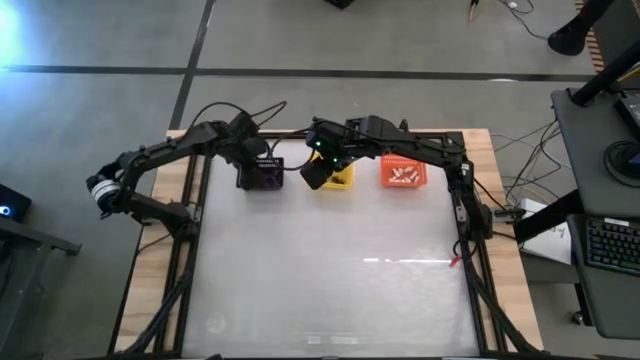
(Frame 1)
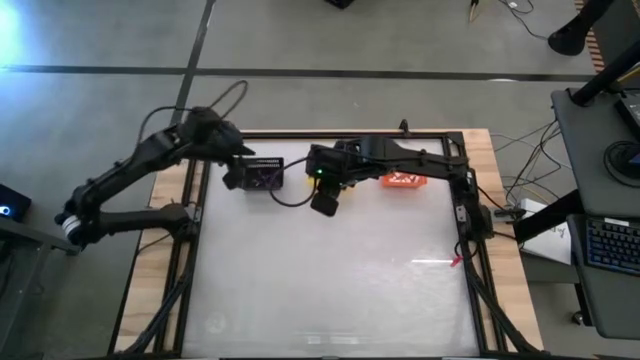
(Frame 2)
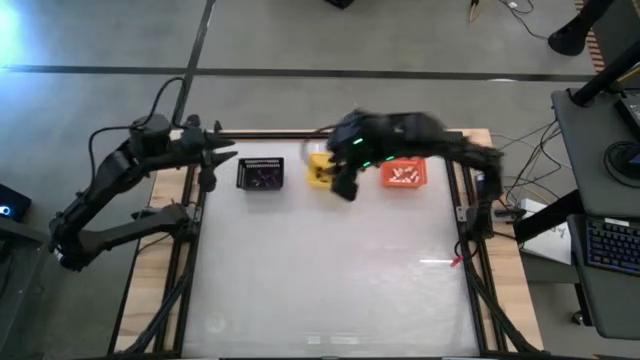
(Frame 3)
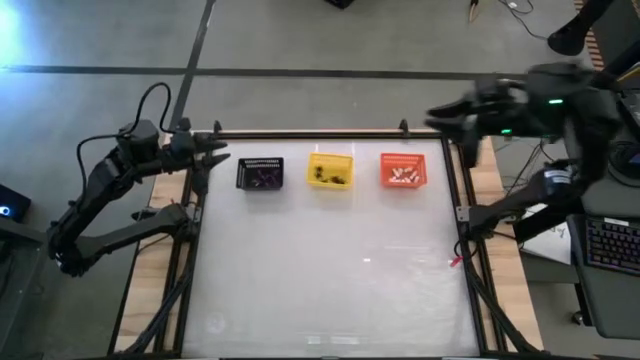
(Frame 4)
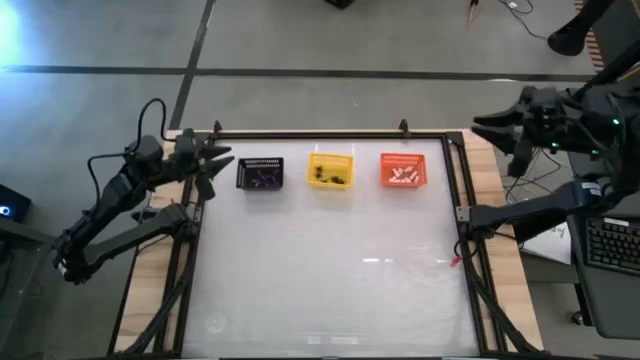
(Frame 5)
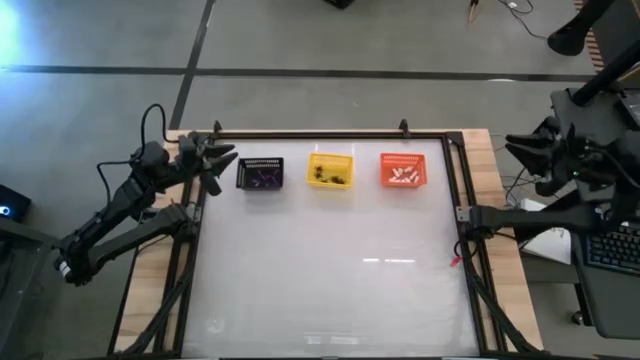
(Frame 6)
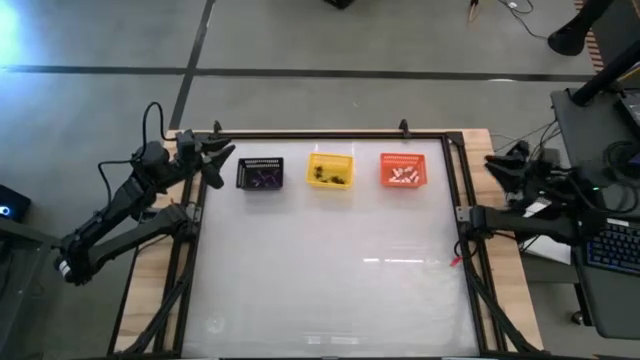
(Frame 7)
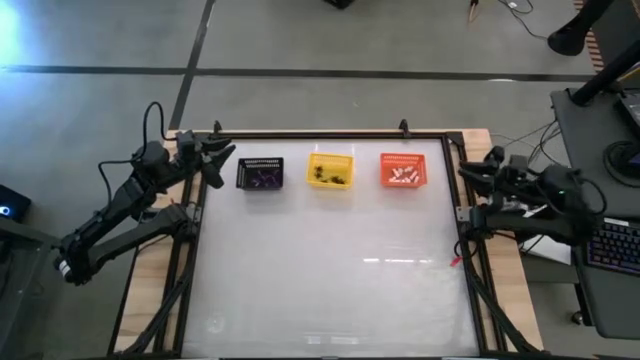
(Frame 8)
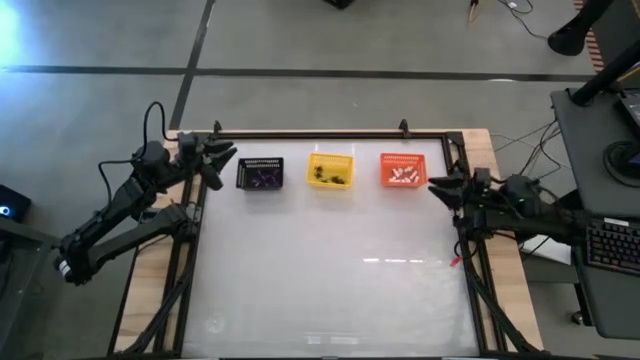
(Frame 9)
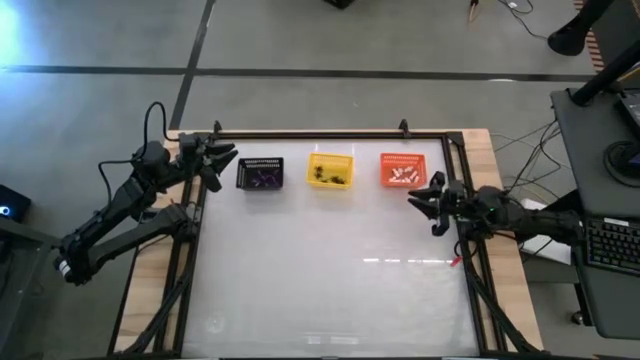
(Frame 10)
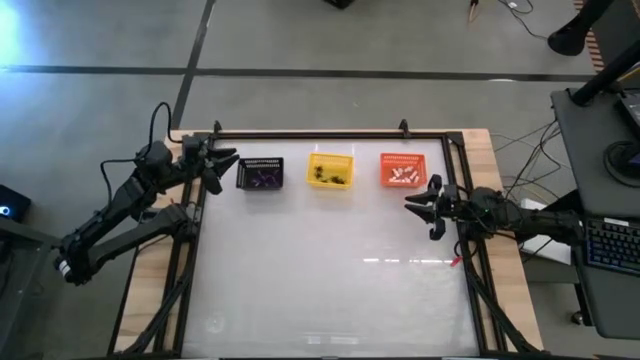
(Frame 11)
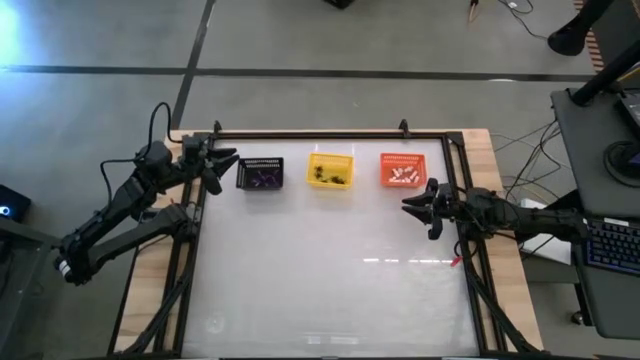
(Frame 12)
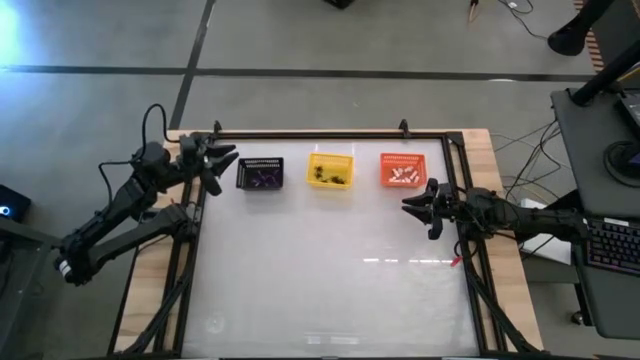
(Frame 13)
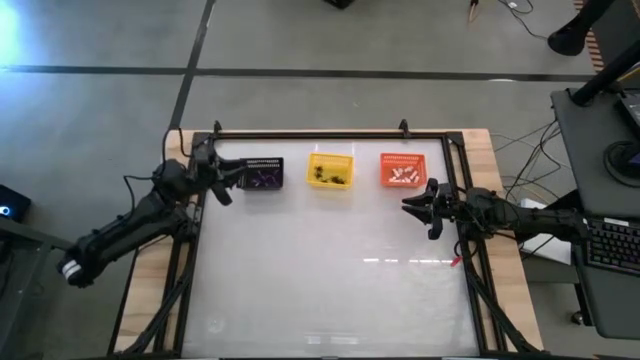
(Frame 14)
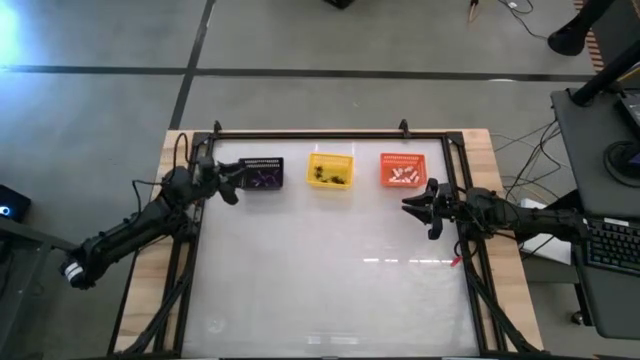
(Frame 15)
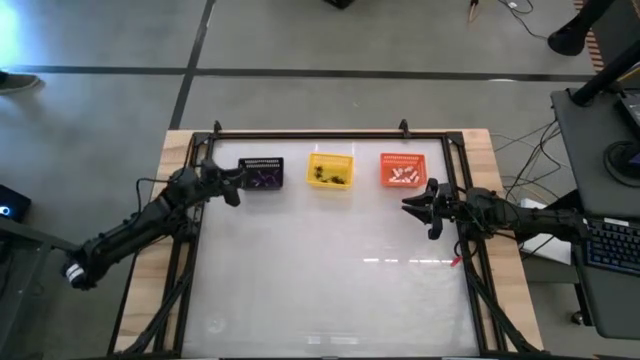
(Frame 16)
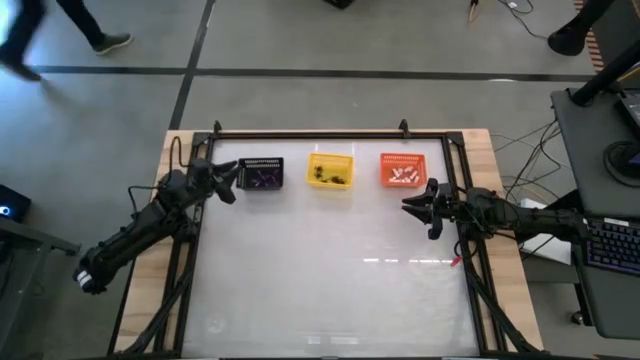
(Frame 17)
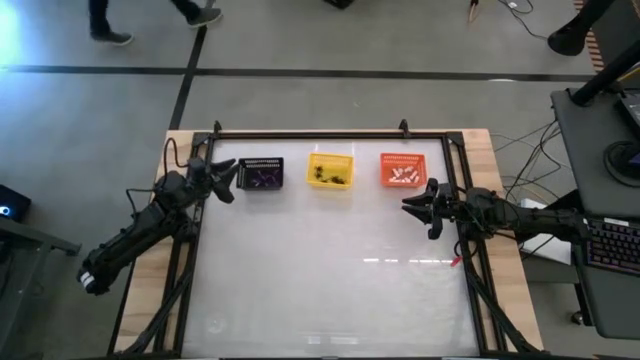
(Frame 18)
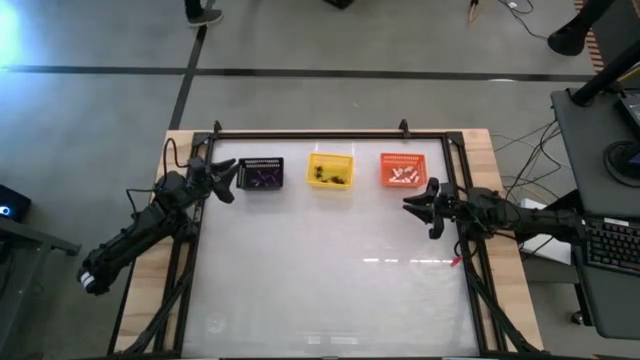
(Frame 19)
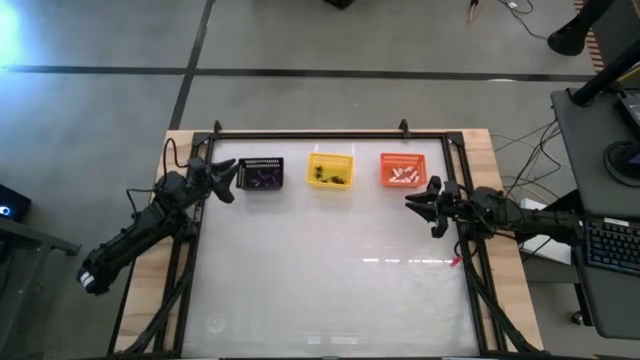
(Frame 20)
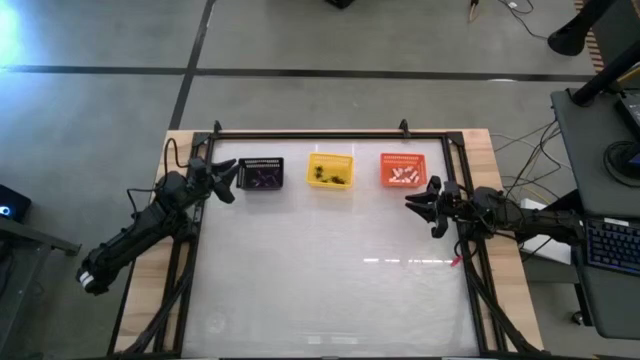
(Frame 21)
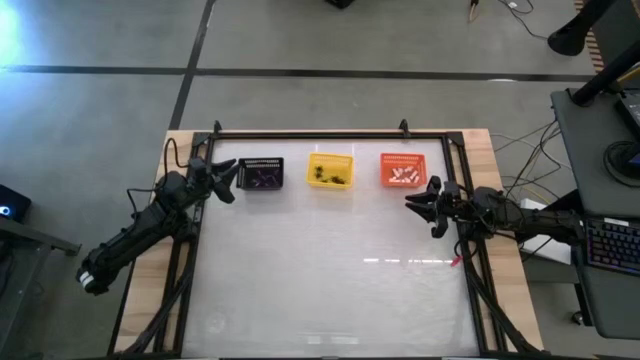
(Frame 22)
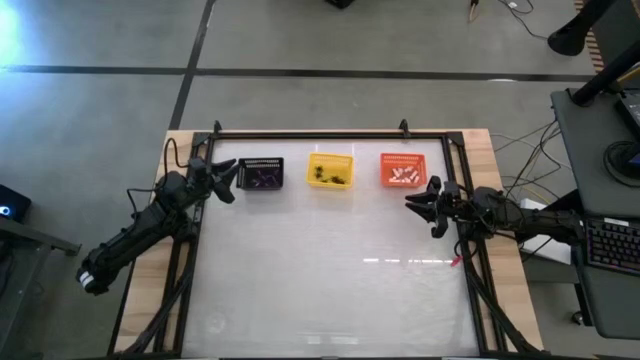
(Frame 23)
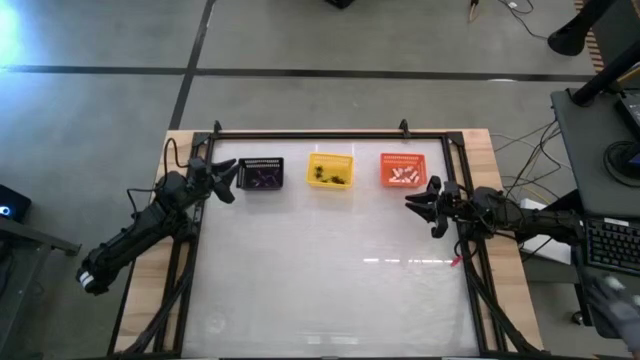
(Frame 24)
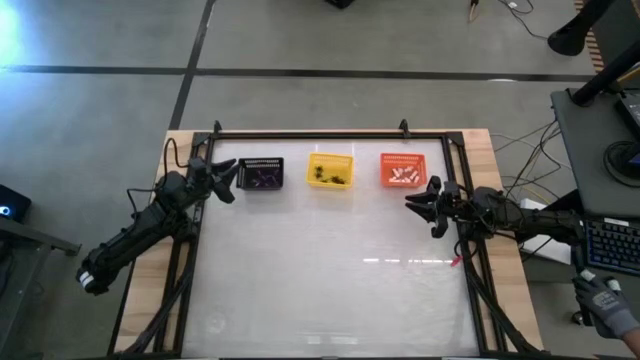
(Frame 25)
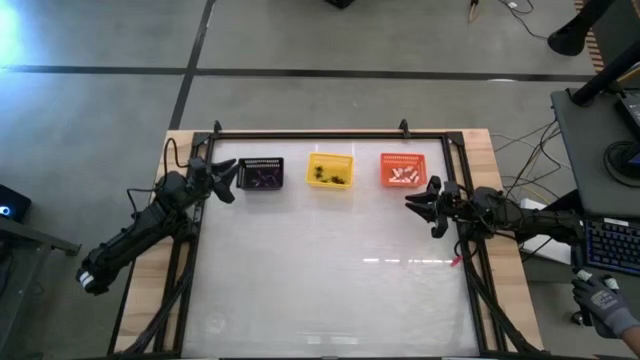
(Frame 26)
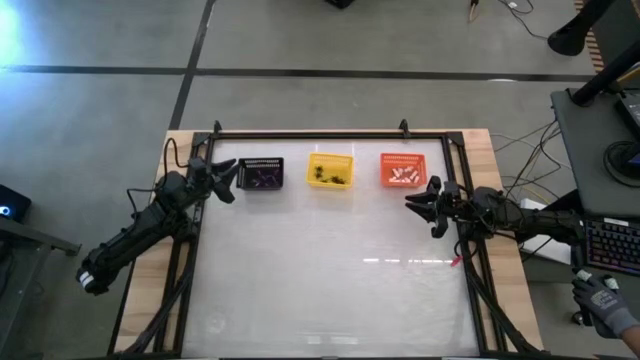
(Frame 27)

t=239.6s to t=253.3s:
Task: Sort Halloween decoration
Return to Home Position

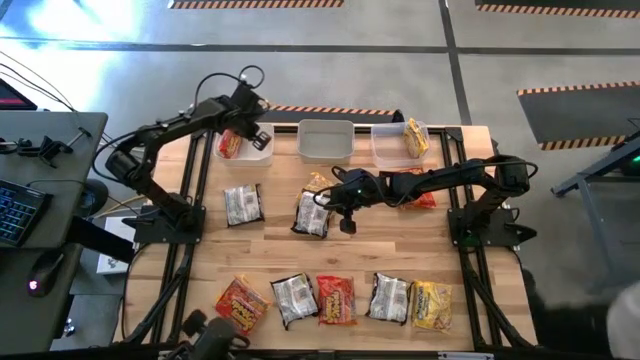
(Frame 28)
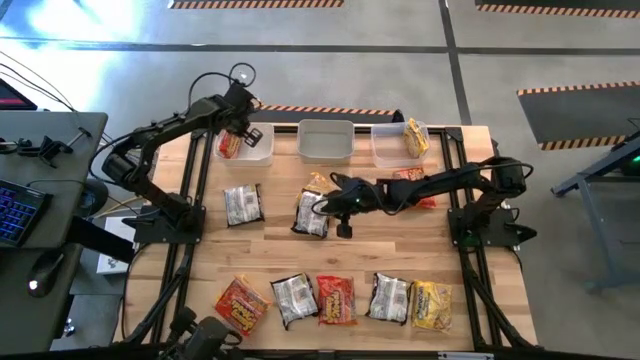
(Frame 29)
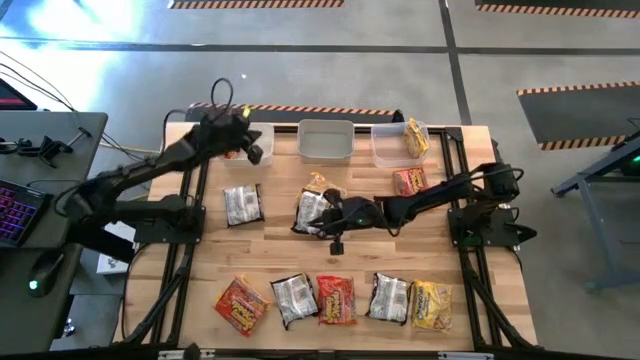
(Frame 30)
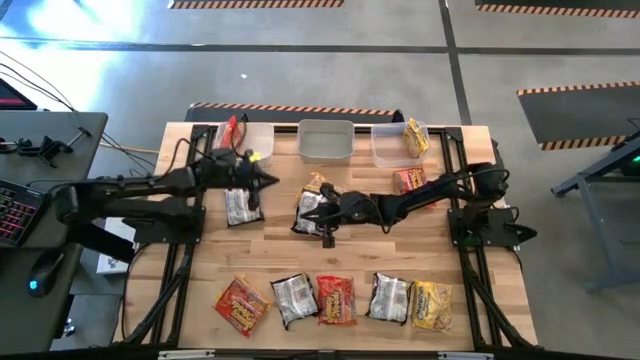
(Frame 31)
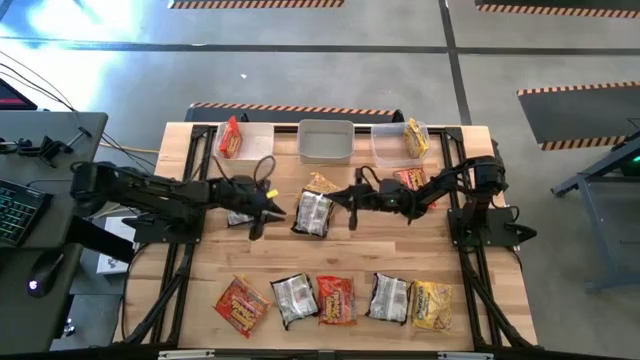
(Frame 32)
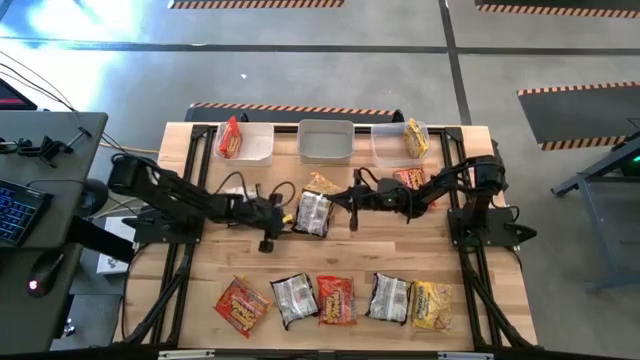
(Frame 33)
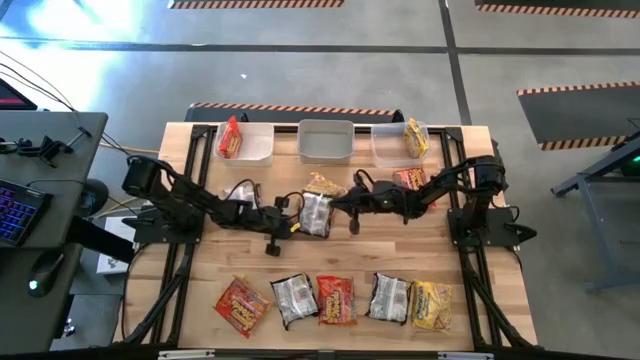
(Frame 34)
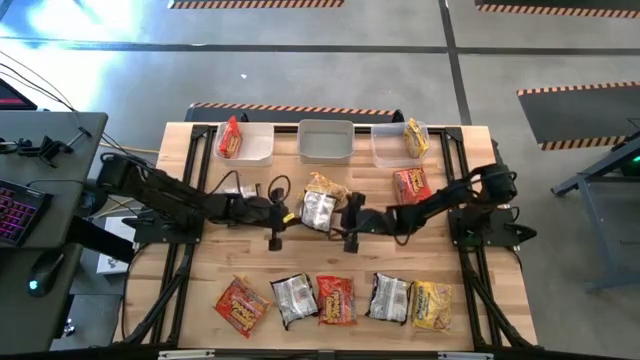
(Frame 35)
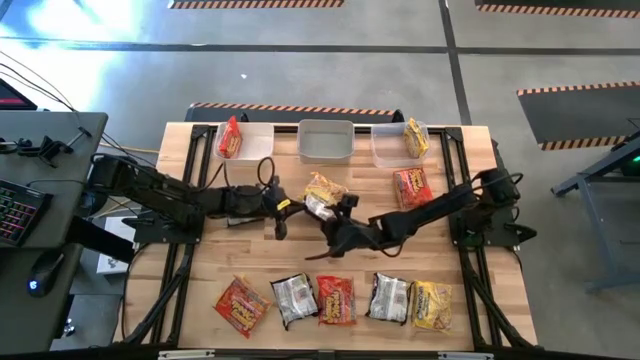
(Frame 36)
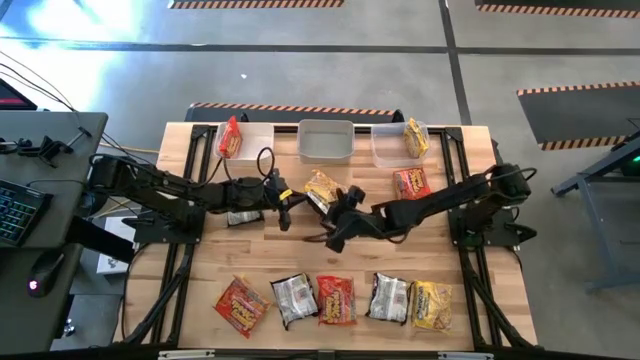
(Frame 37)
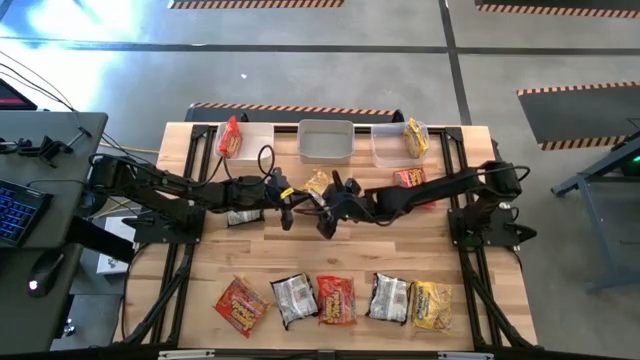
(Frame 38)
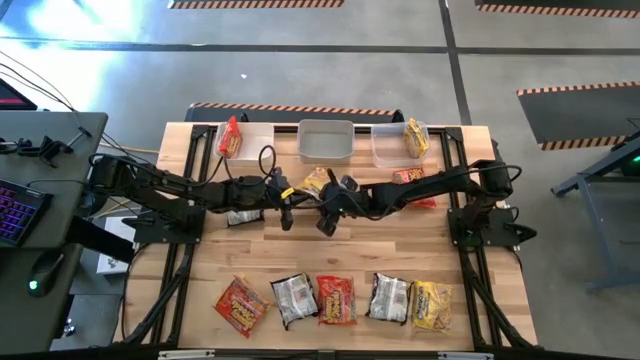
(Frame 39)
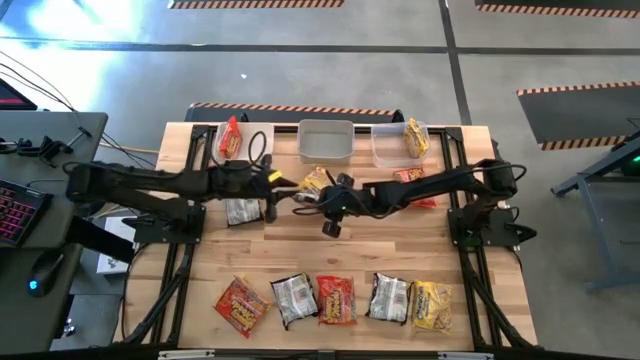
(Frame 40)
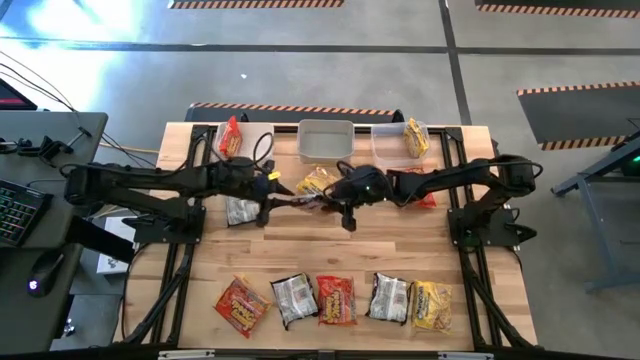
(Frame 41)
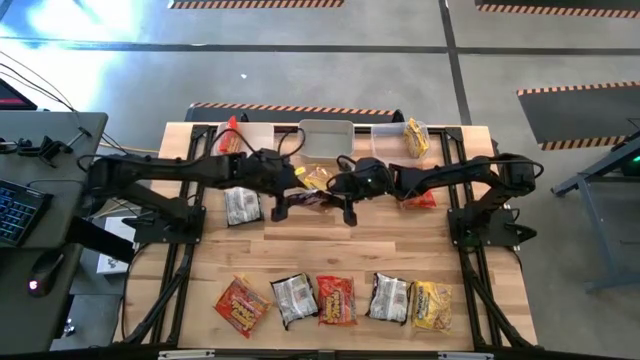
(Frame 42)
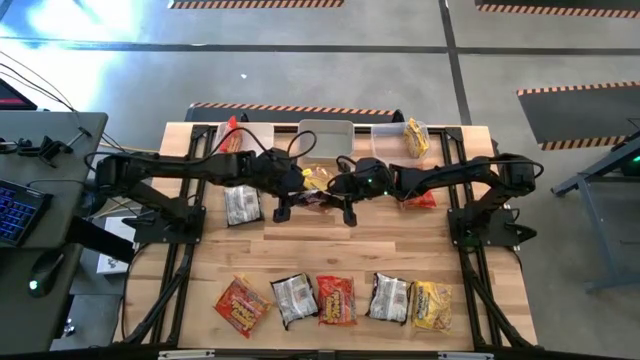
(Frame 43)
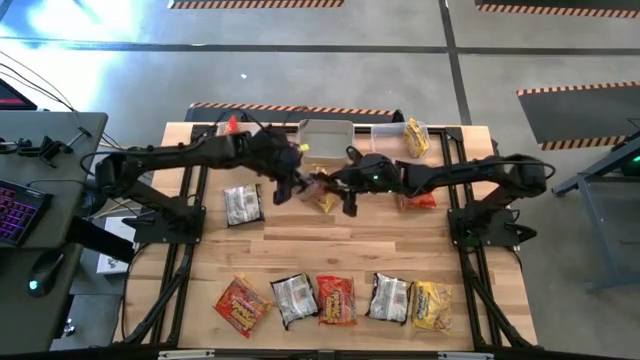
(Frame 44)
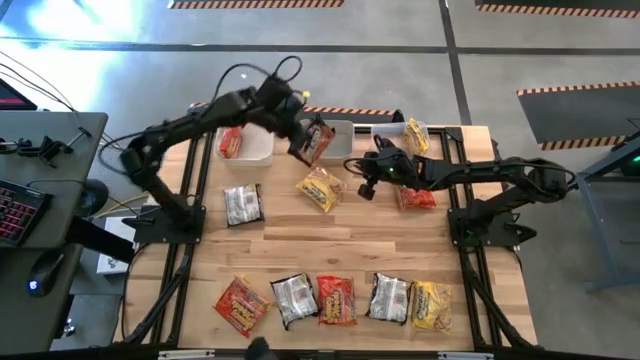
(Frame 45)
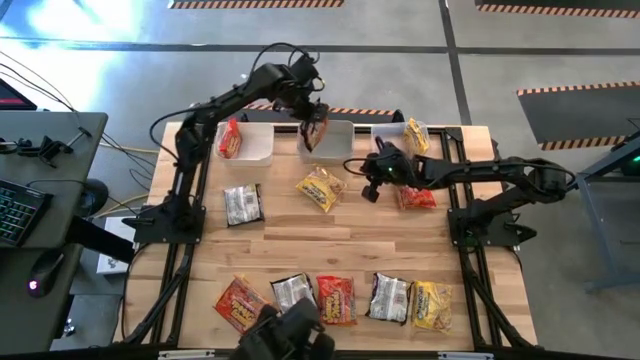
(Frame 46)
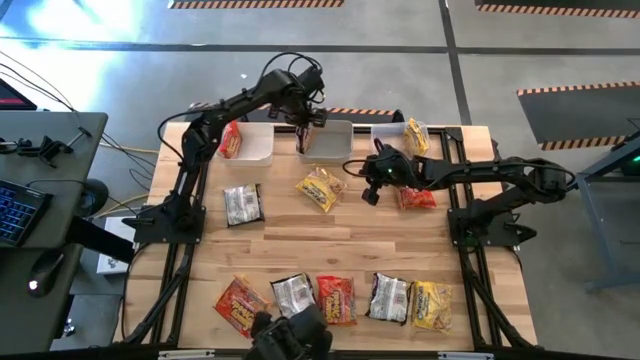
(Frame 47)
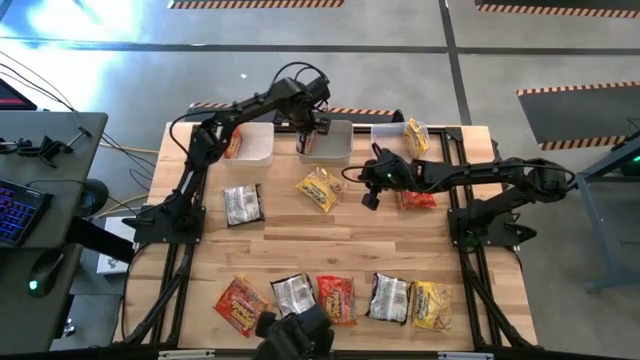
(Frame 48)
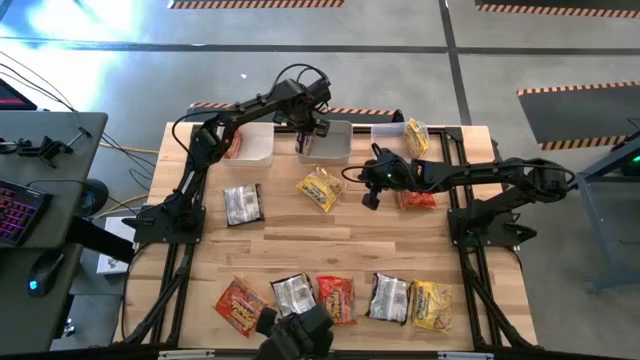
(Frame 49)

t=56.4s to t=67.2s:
Task: Sort Maruchan noodles
Put the black noodle pack into the gray bin
